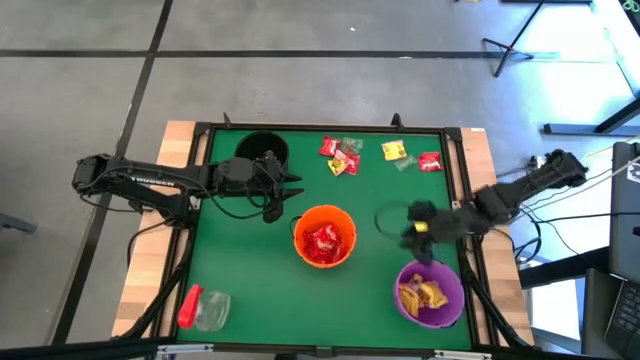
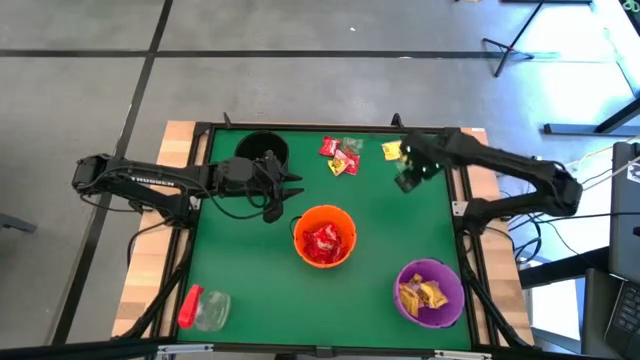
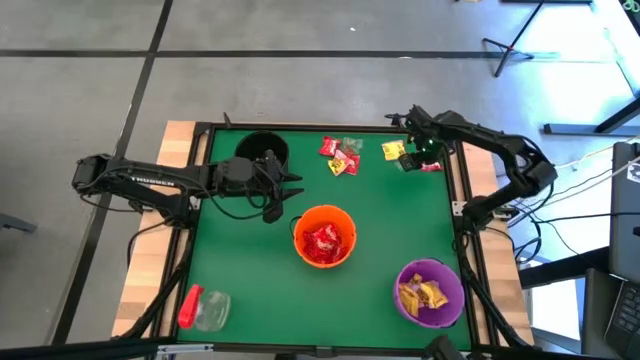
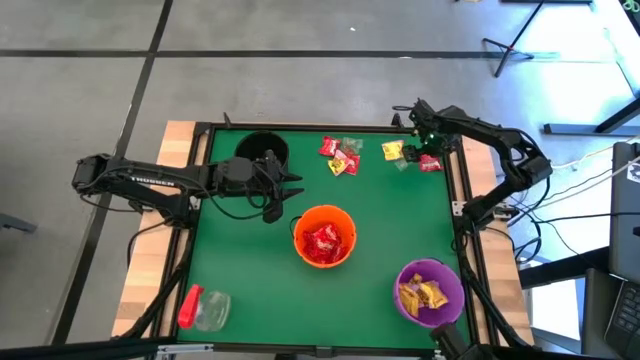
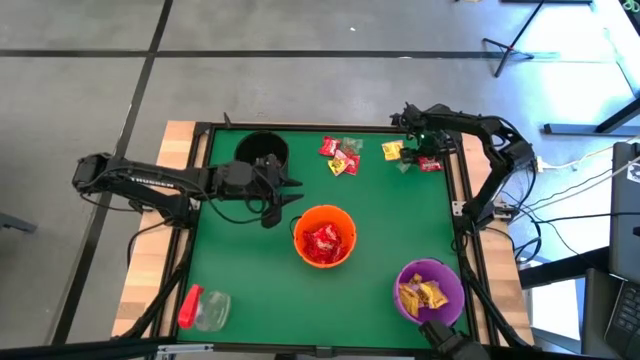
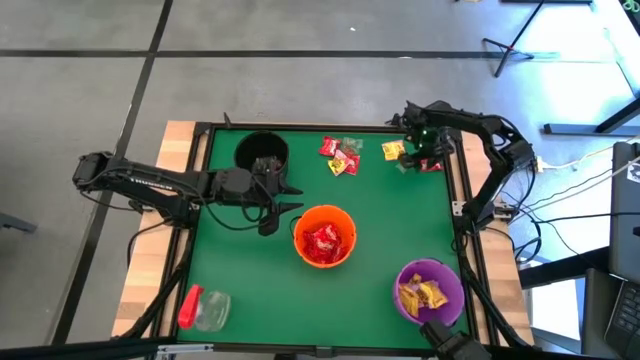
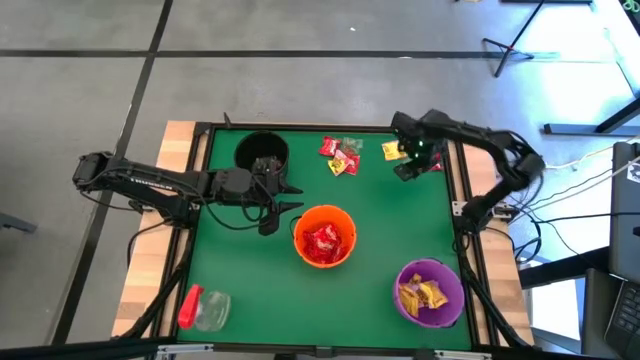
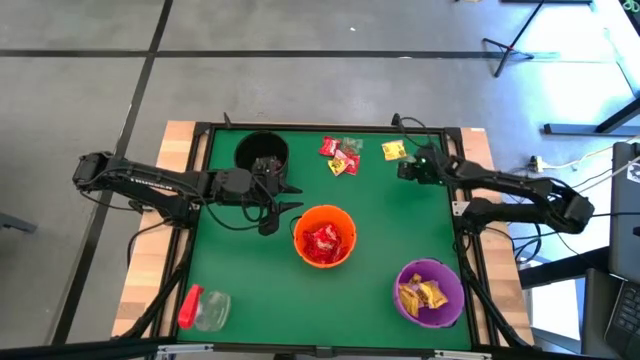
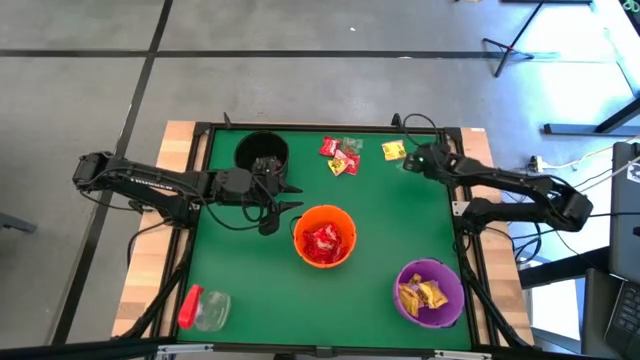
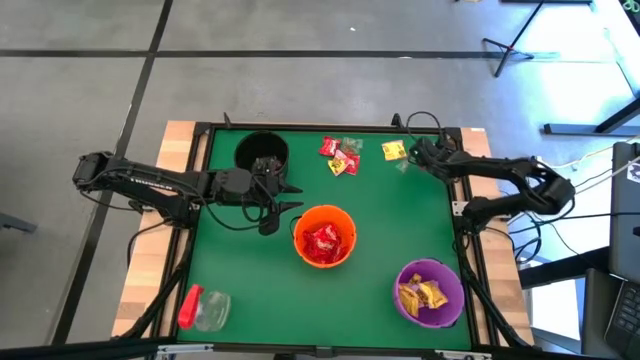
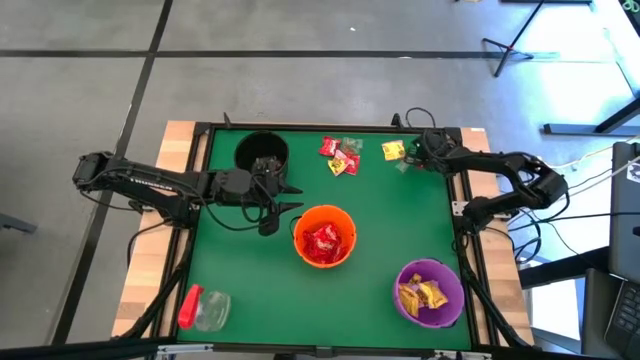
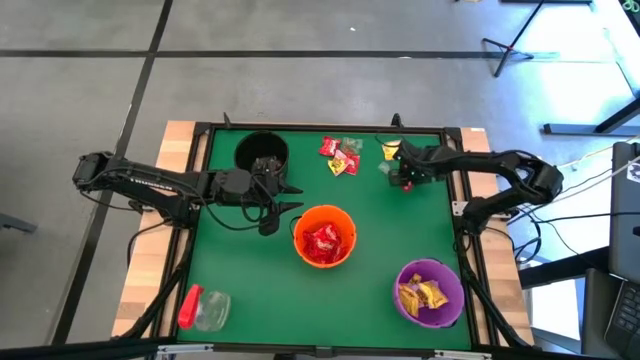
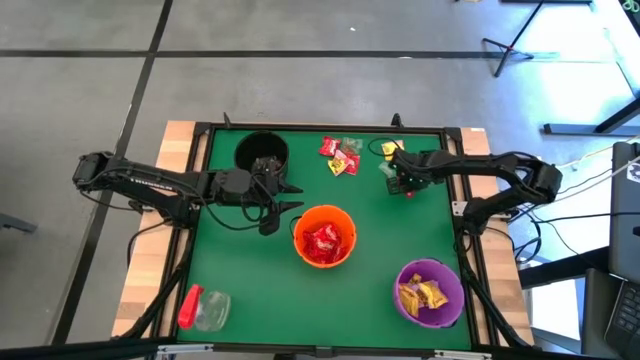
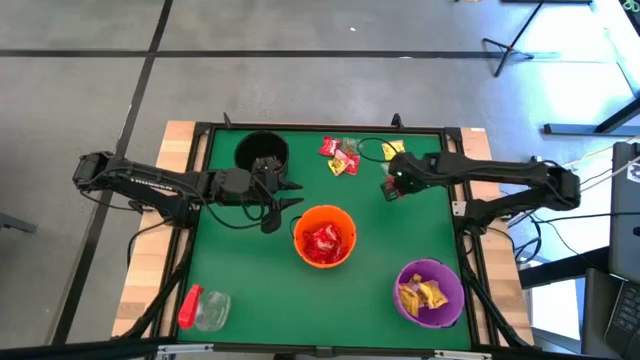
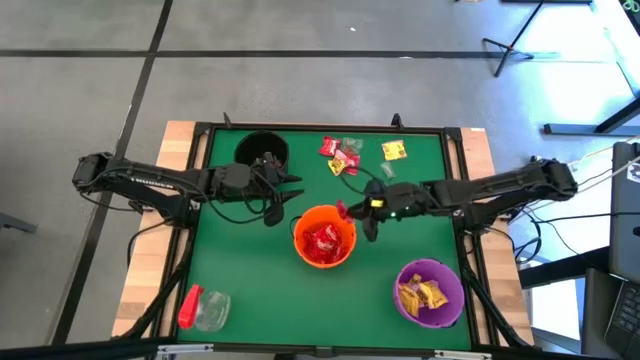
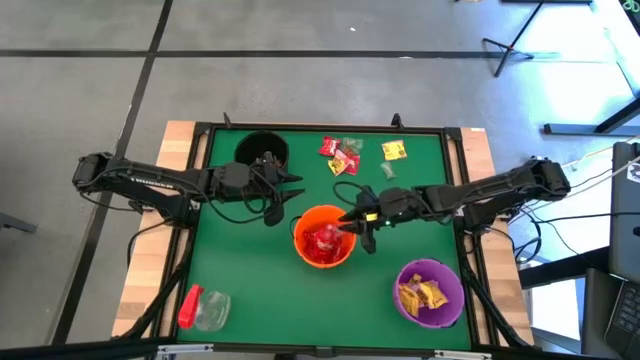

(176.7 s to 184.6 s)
Task: Sort candy
Put the red candy into the orange bin

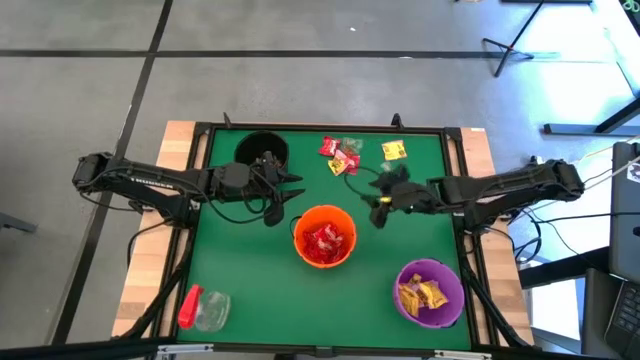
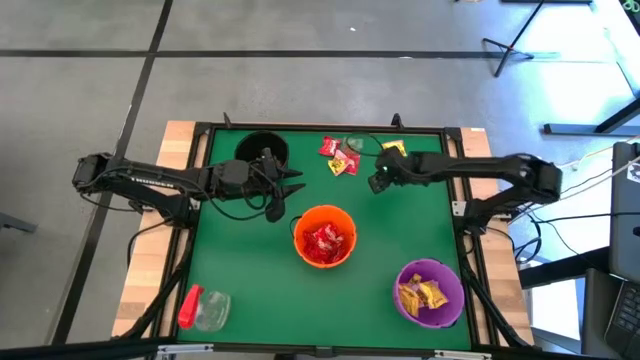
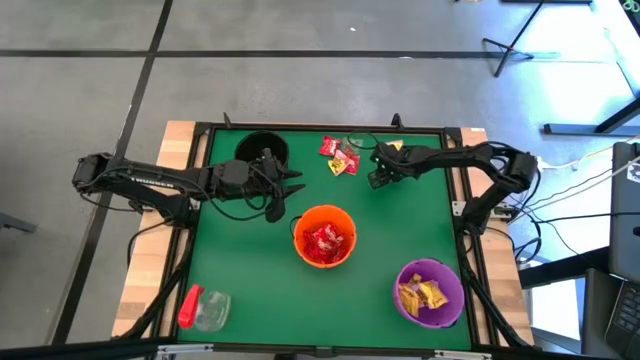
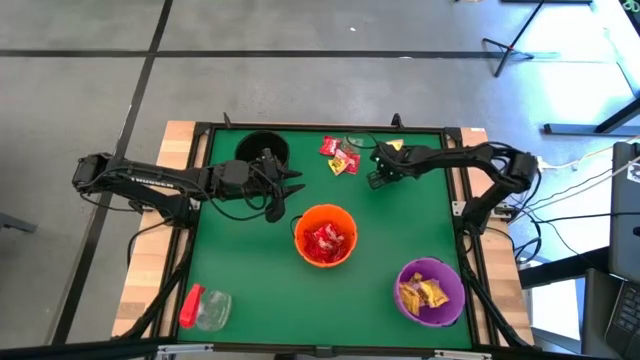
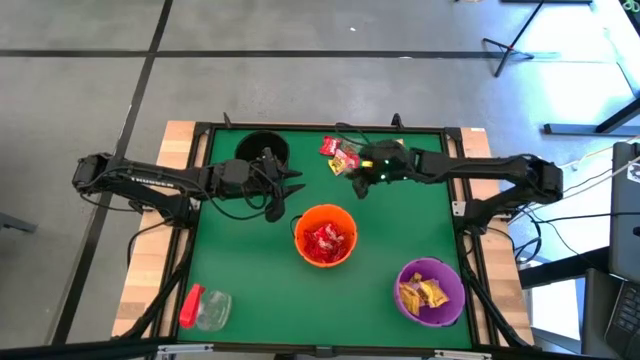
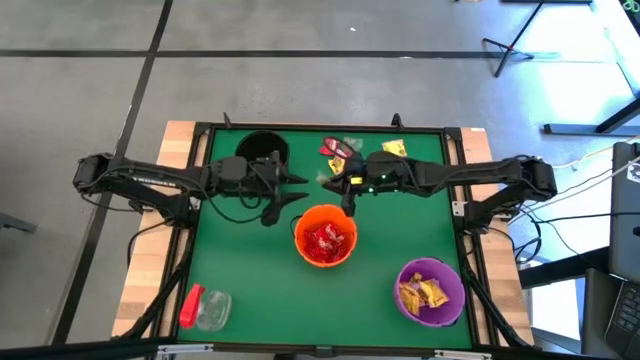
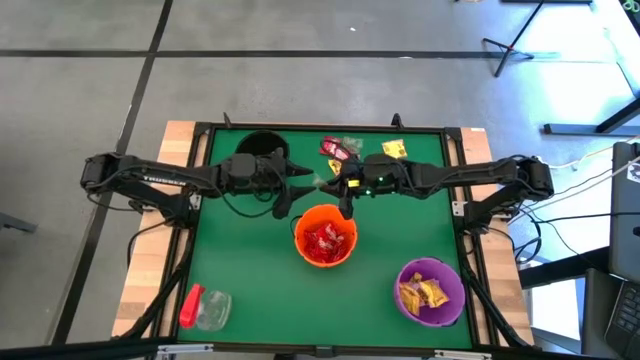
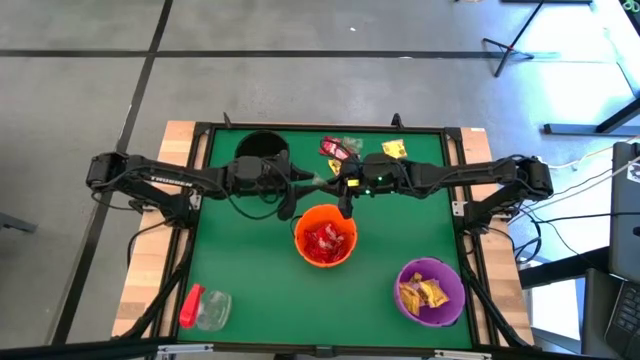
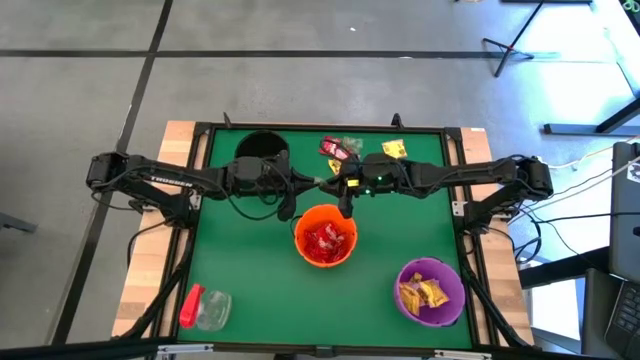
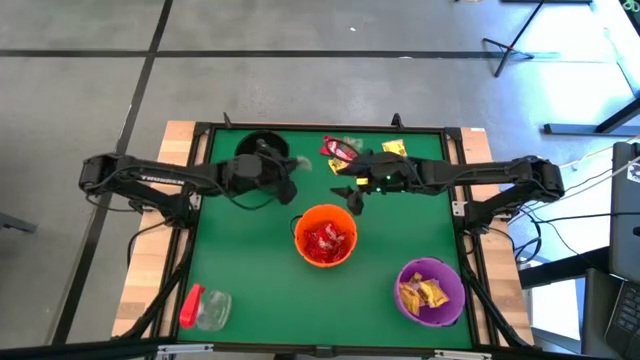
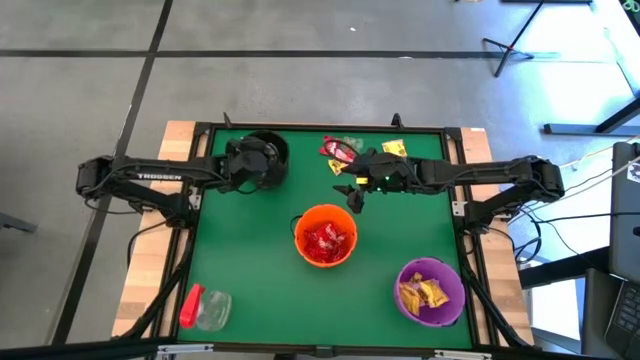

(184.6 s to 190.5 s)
Put the green candy into the black bin

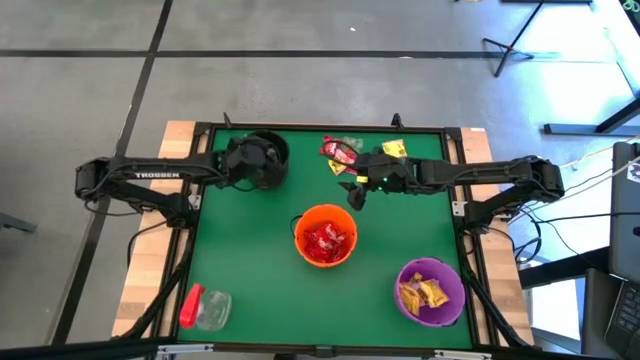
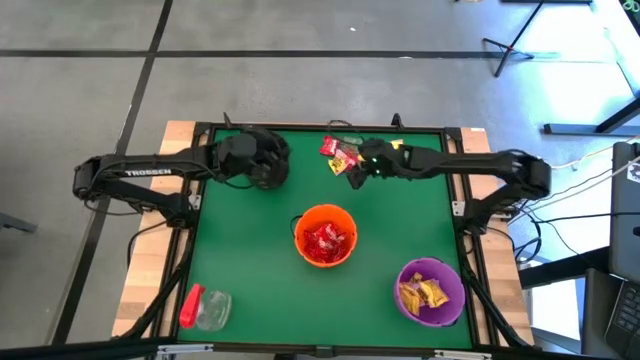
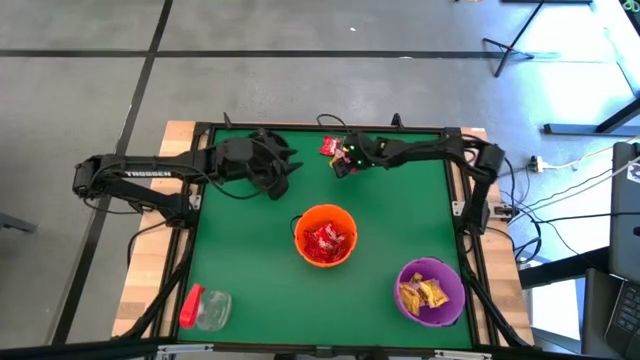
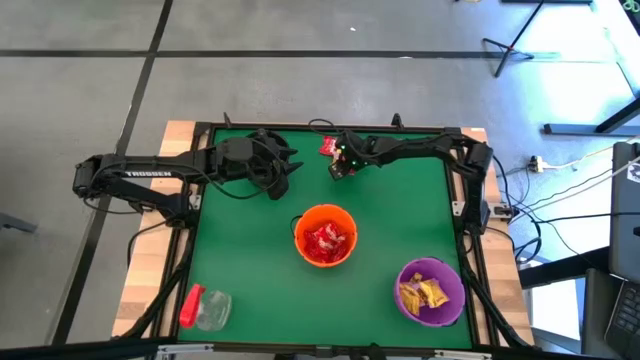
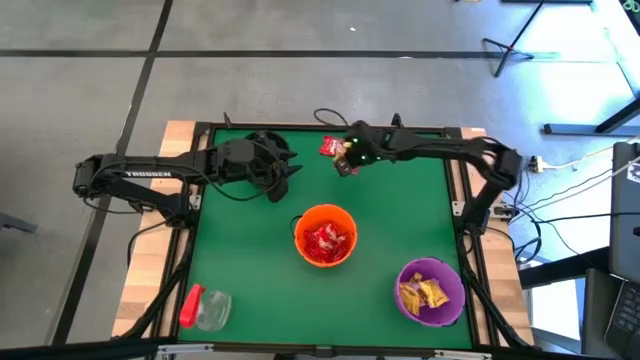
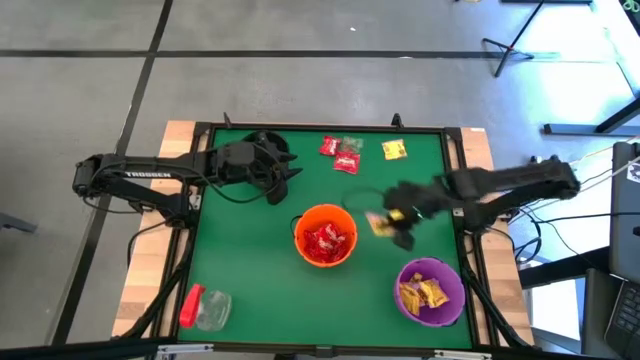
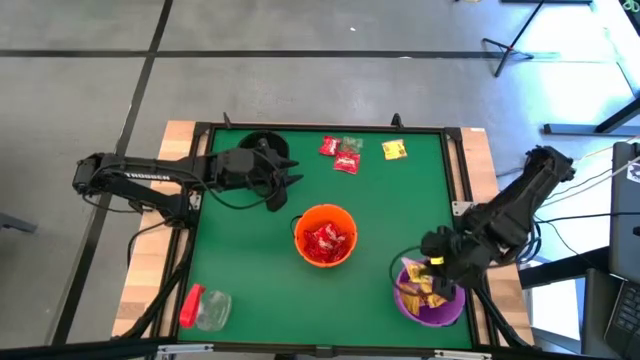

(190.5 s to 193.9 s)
Put the yellow candy into the purple bin

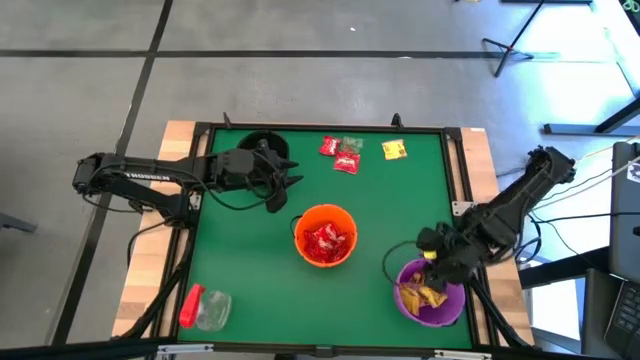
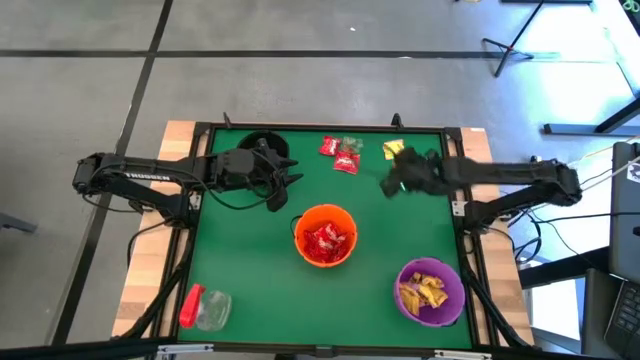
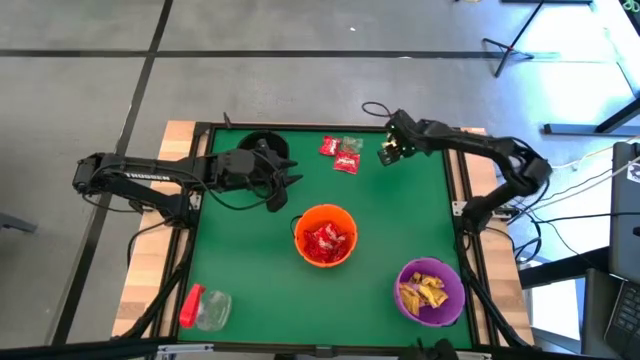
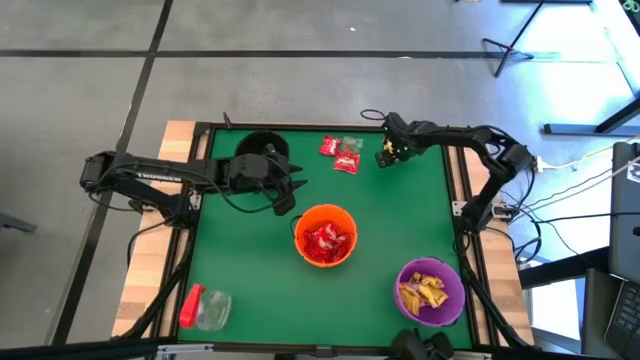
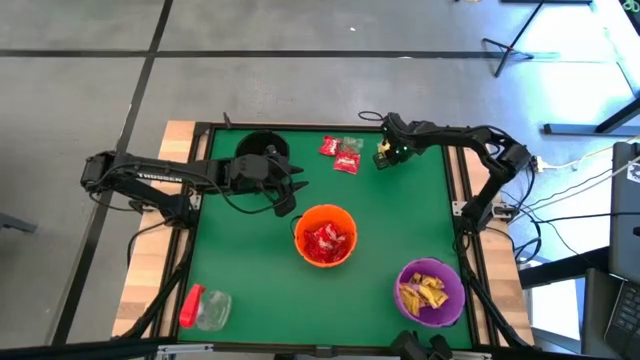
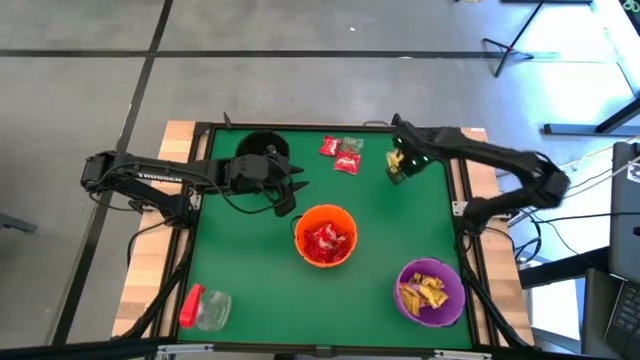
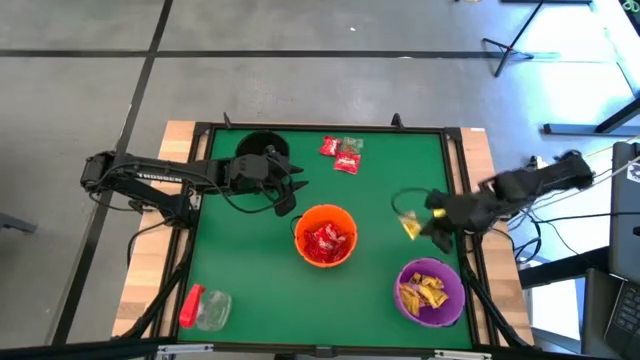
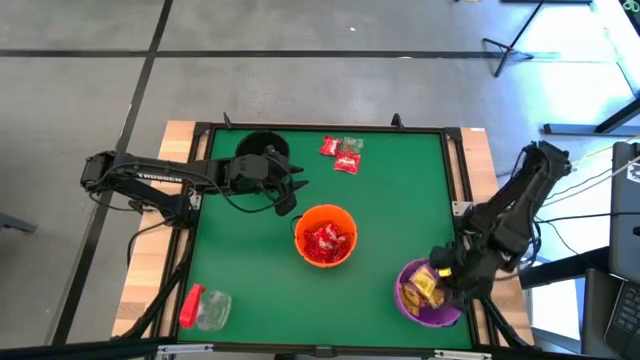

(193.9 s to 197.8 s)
Put the yellow candy into the purple bin
